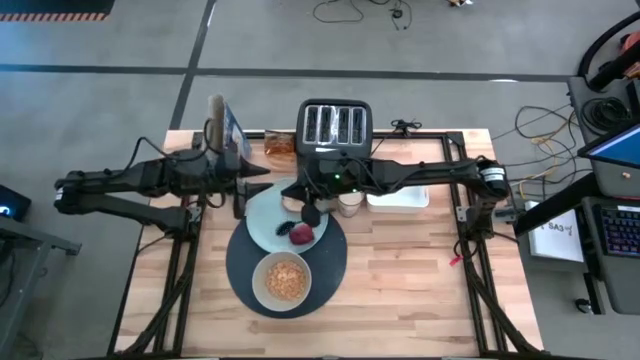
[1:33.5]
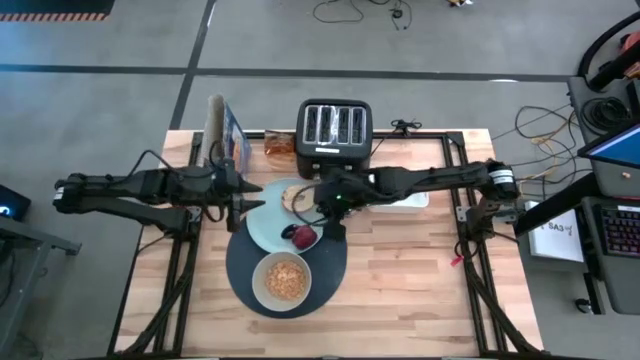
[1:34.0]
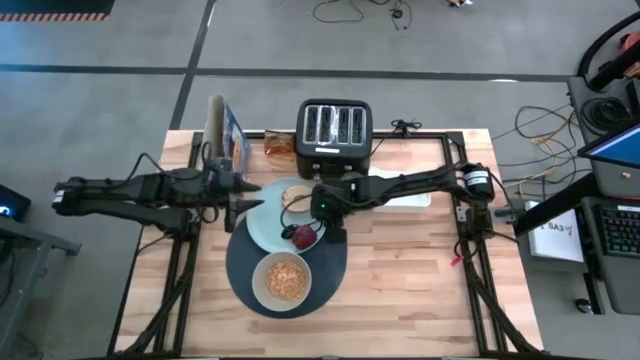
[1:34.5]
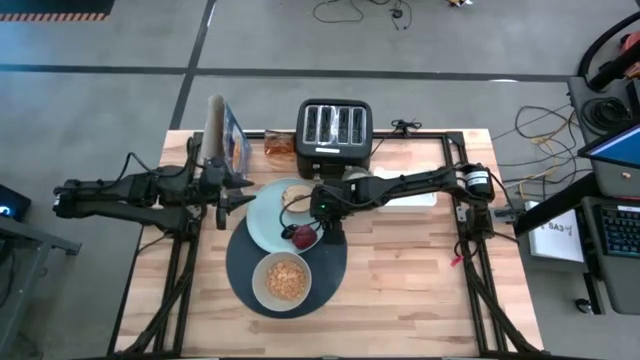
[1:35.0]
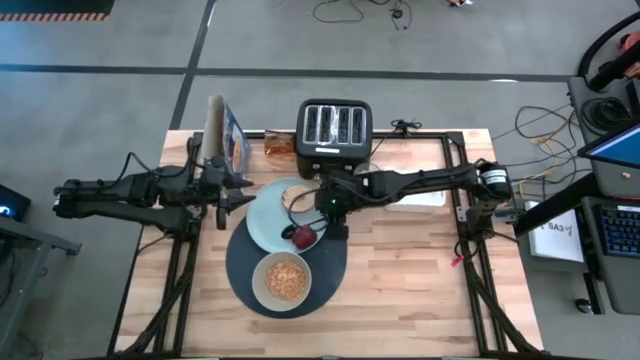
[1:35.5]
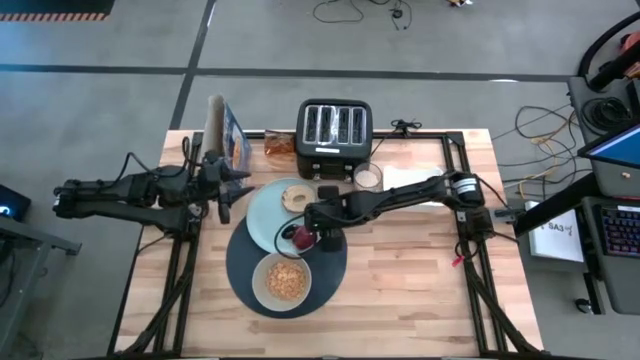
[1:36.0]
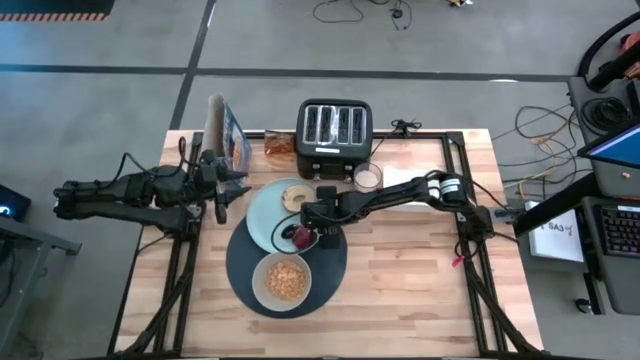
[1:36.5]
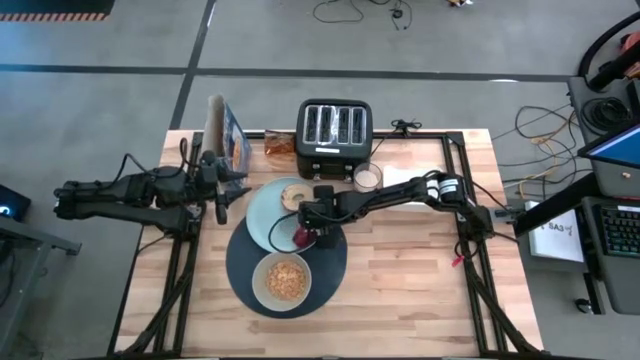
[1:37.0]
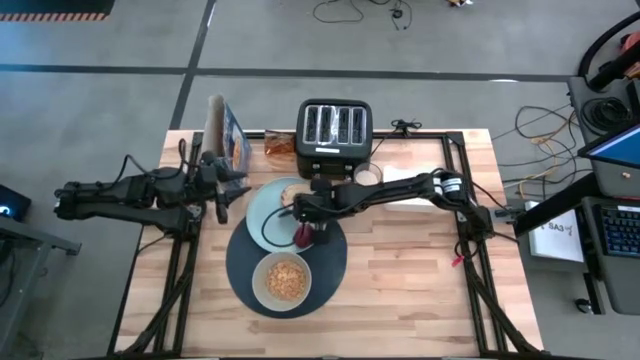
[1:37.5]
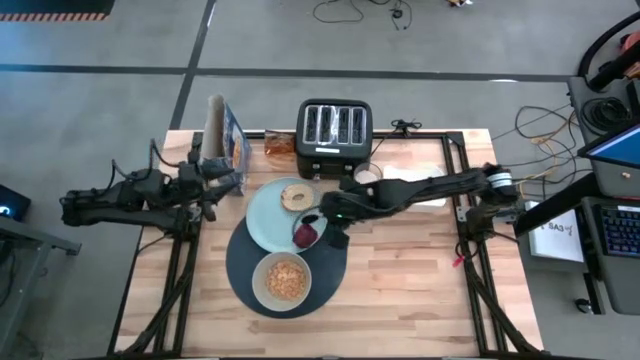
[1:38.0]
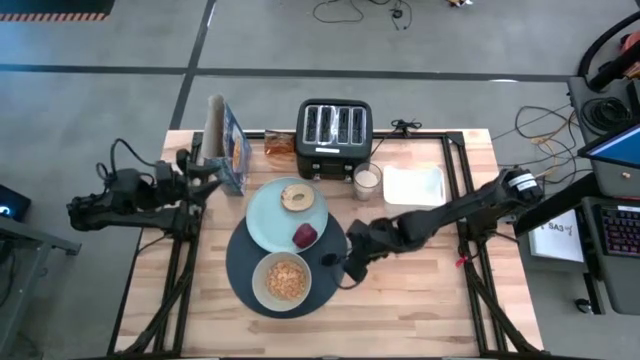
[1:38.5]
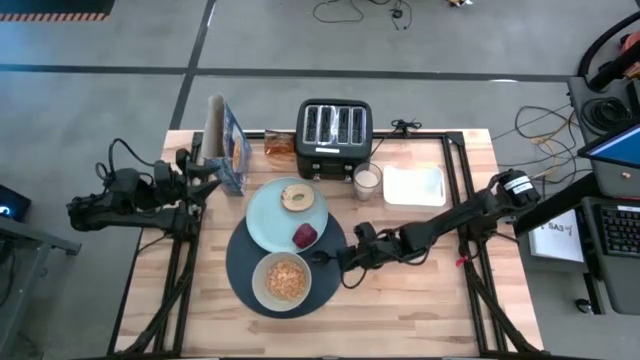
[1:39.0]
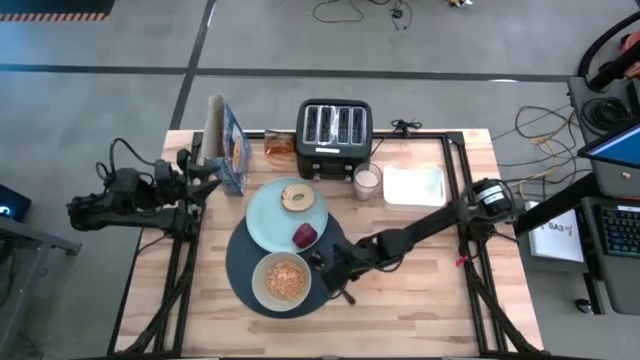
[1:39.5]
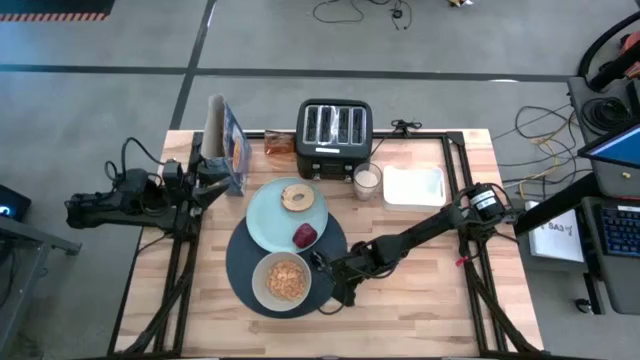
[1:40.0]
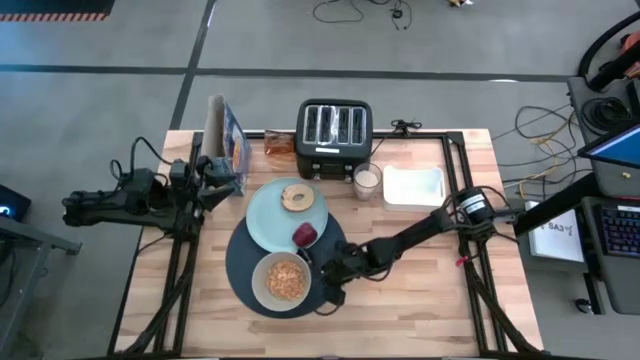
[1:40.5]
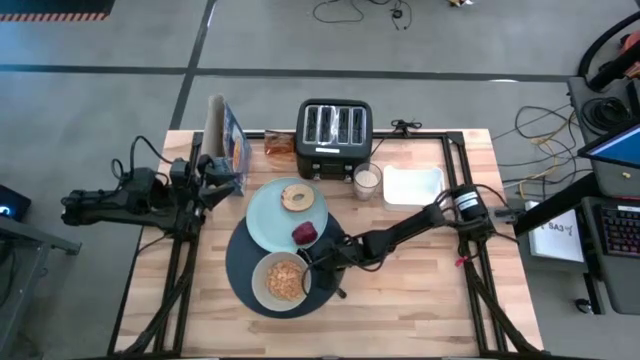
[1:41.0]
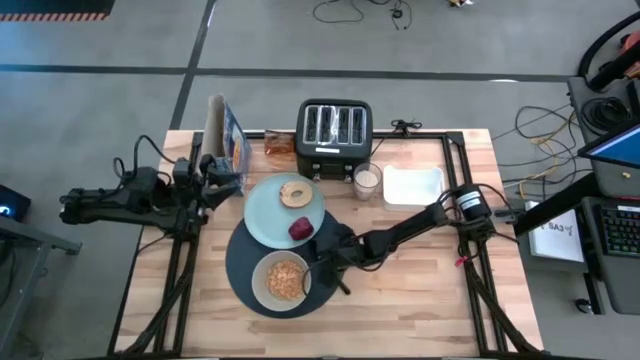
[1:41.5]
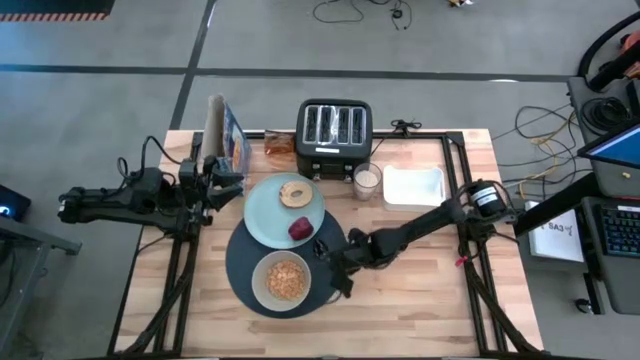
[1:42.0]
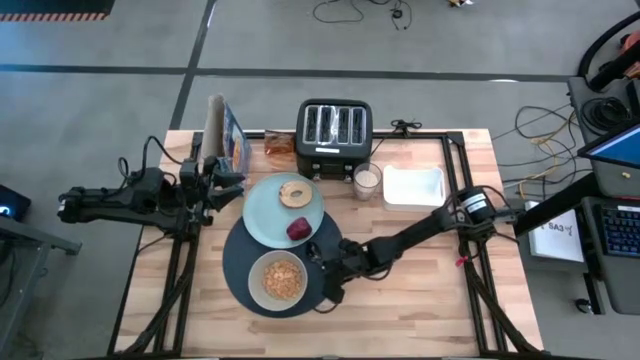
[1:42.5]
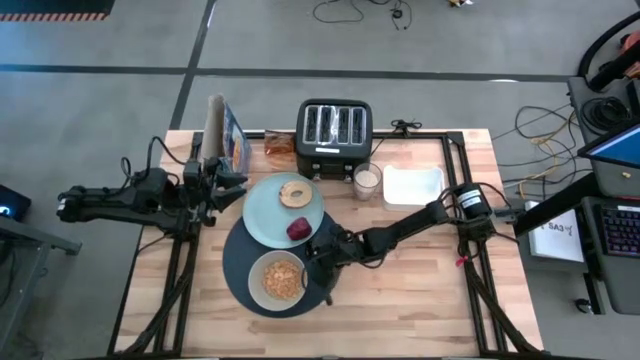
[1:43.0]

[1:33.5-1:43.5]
Task: Arrange a breakfast setting
Put the black spoon on the blue table mat to the right of the gray bowl

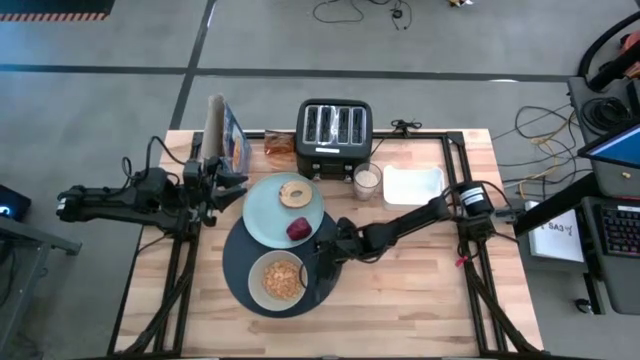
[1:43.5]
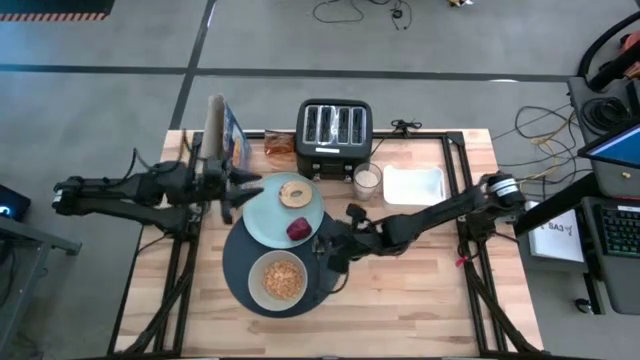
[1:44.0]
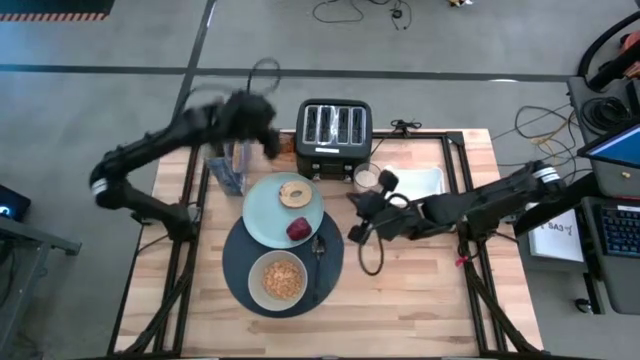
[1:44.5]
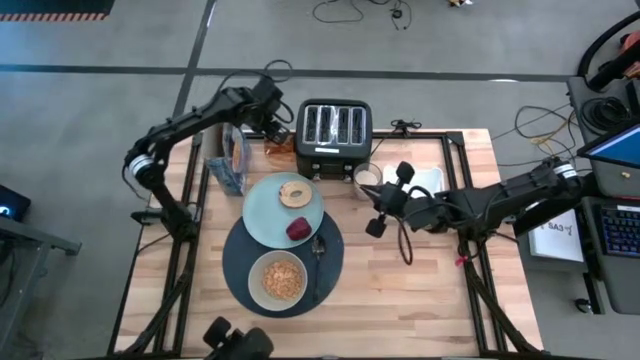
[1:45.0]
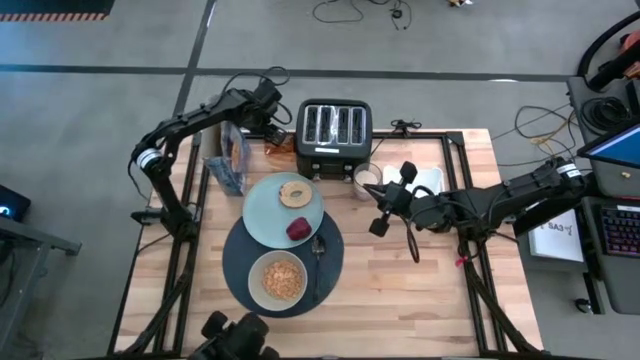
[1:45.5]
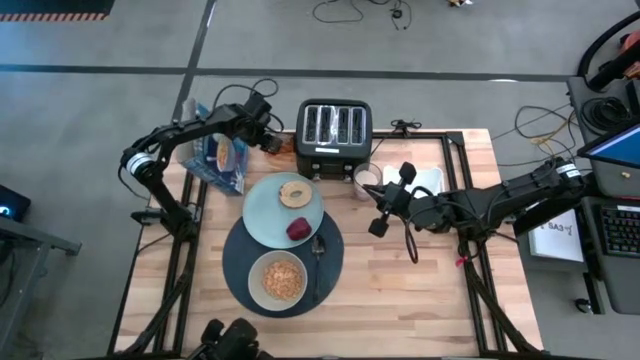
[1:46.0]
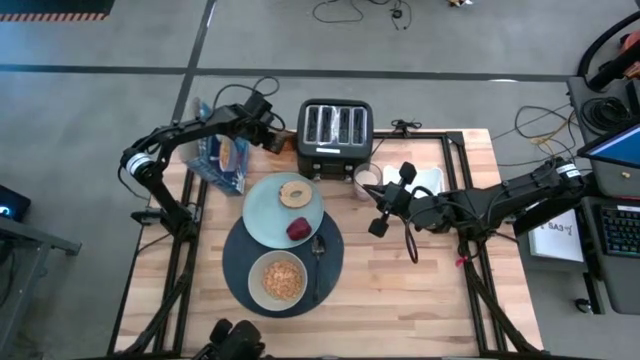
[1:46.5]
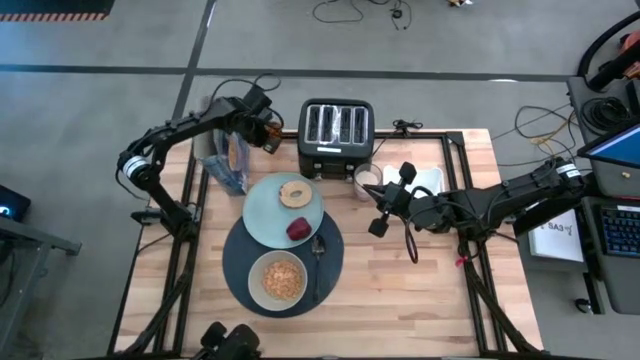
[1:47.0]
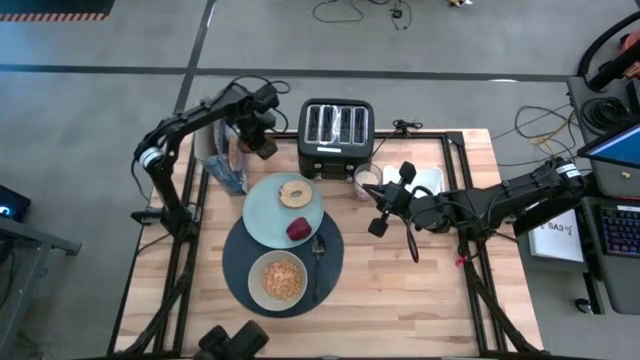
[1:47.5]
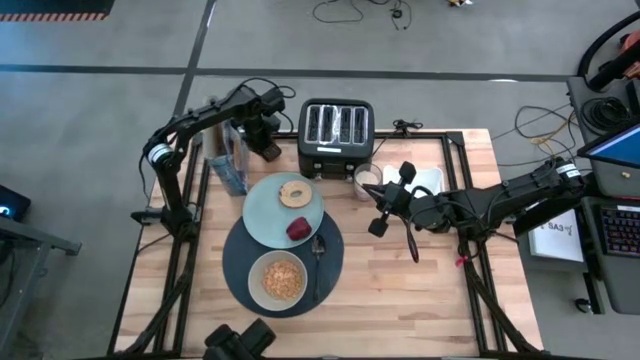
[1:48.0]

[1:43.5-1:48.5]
Adjust the yellow cup on the table

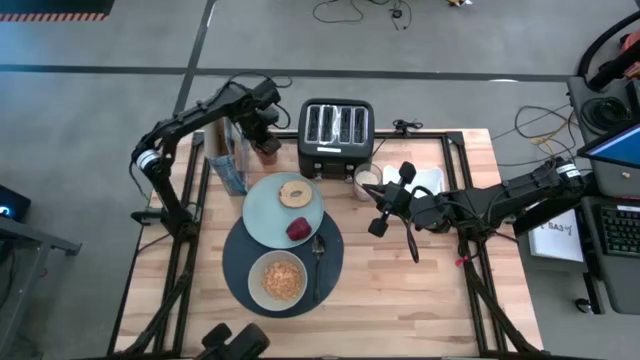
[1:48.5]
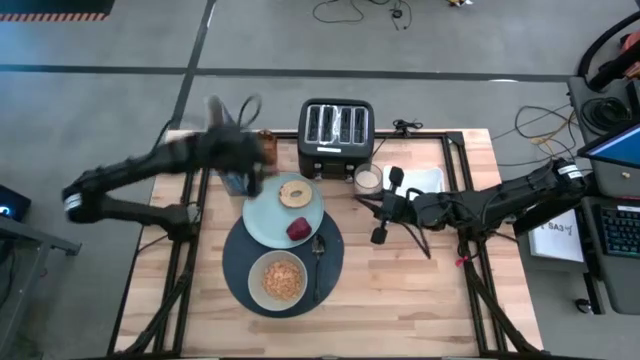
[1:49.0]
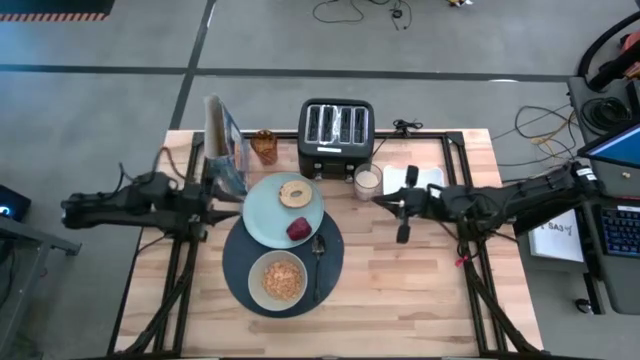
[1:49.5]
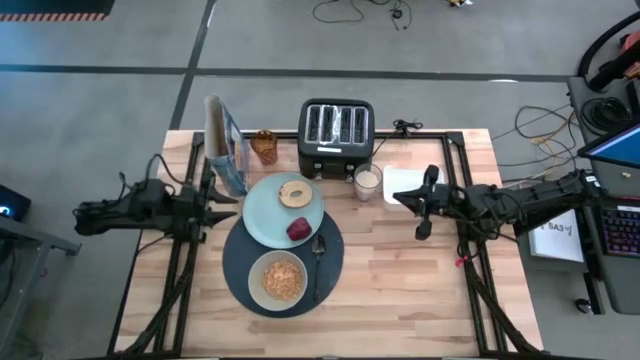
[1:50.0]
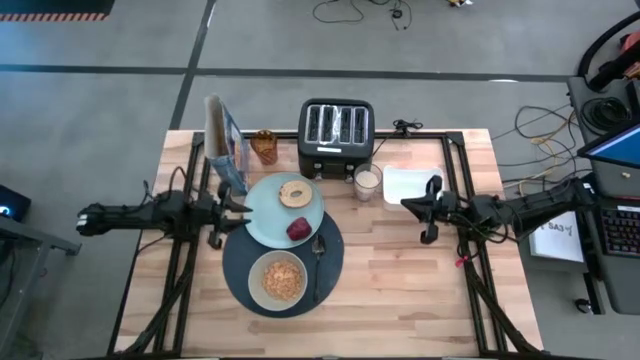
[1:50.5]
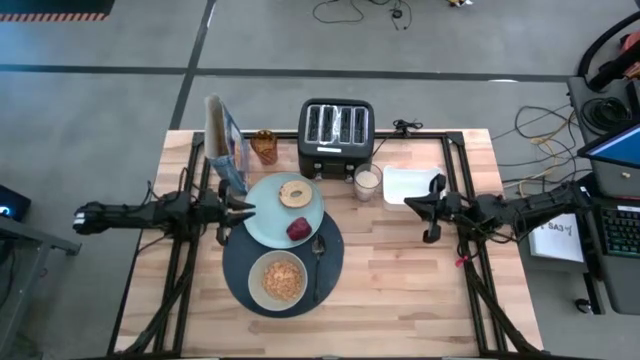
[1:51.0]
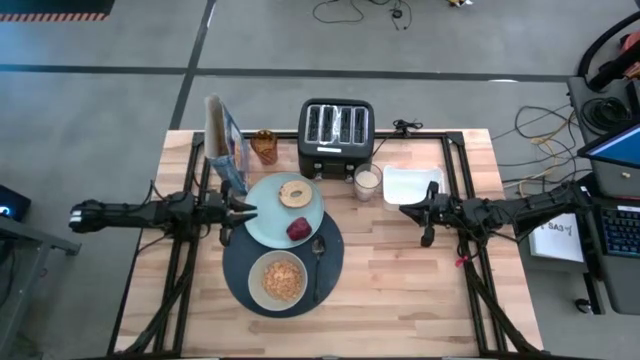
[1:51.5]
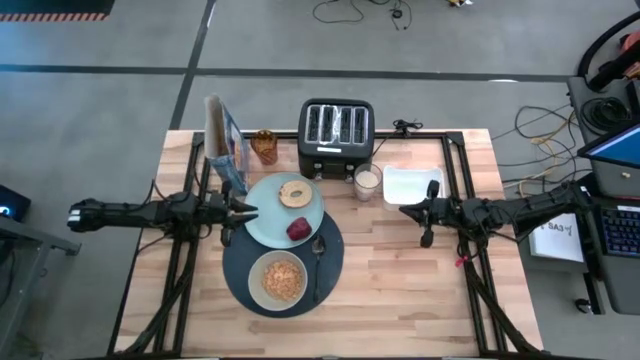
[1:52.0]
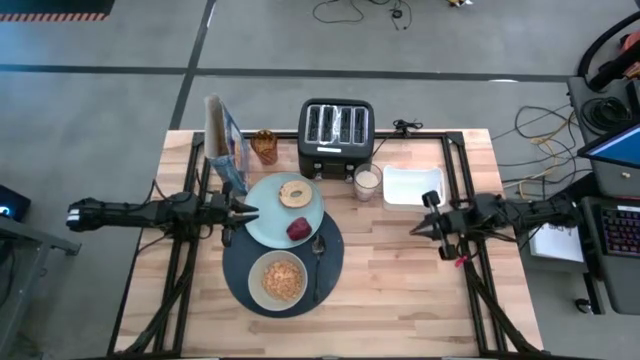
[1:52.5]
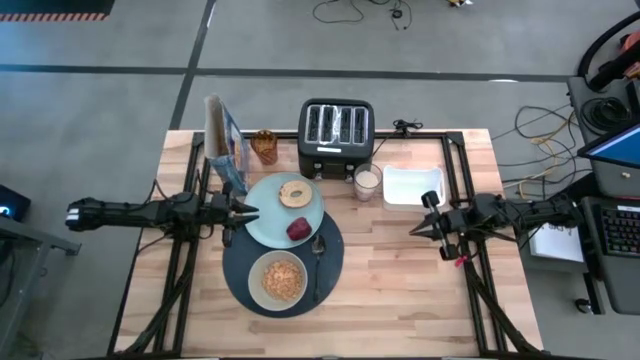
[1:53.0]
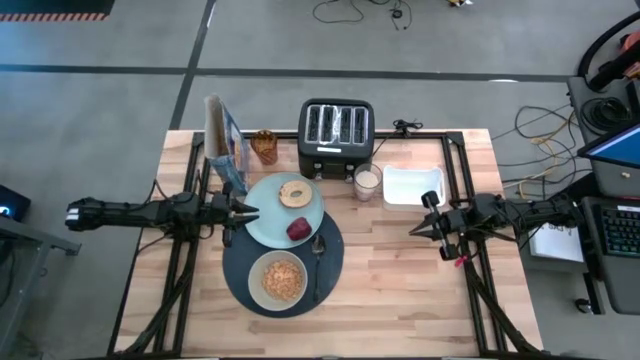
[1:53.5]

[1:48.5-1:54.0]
Return to Home Position
